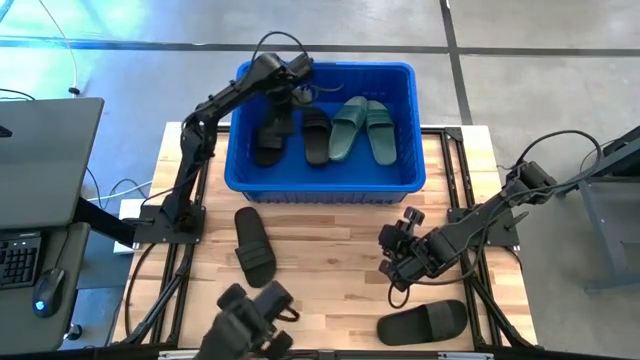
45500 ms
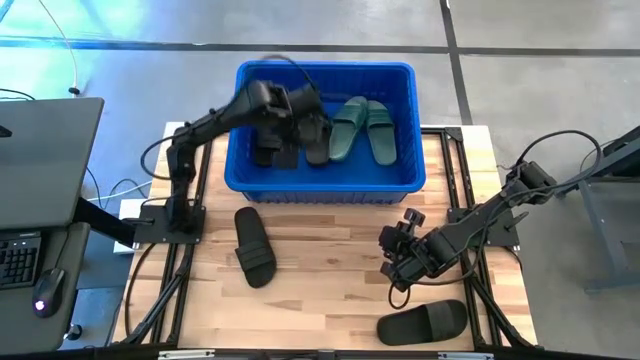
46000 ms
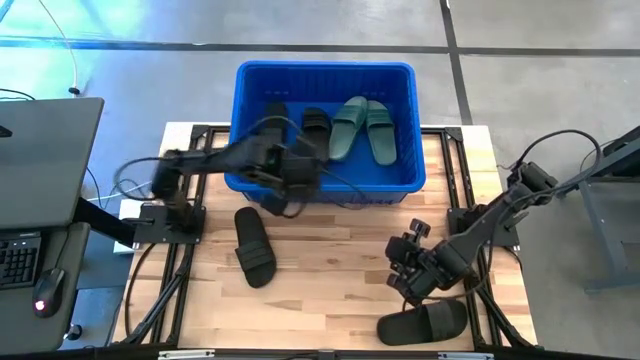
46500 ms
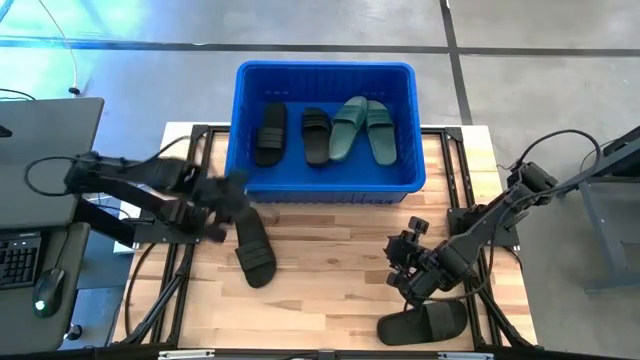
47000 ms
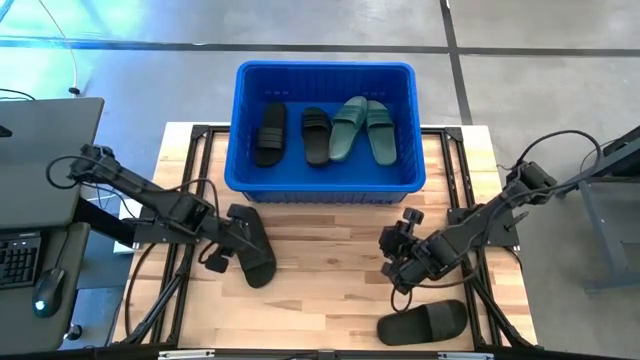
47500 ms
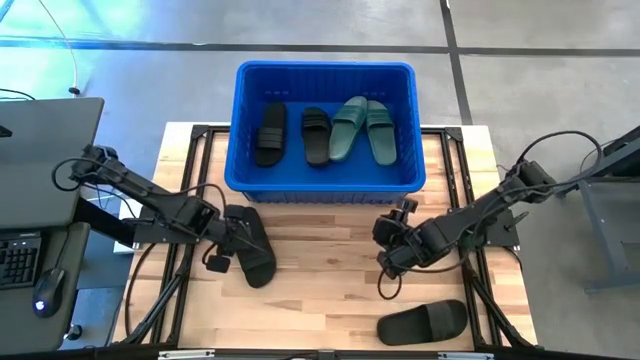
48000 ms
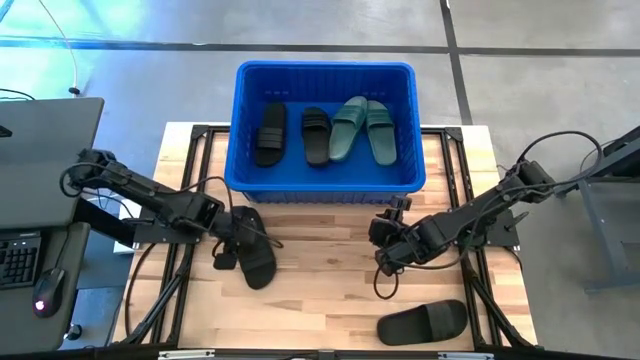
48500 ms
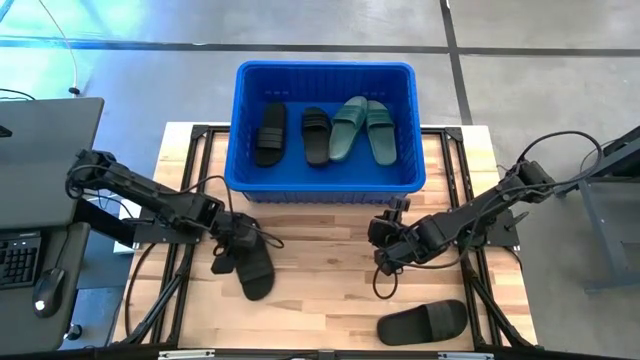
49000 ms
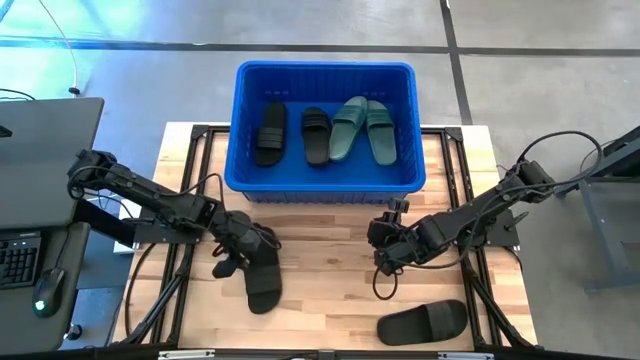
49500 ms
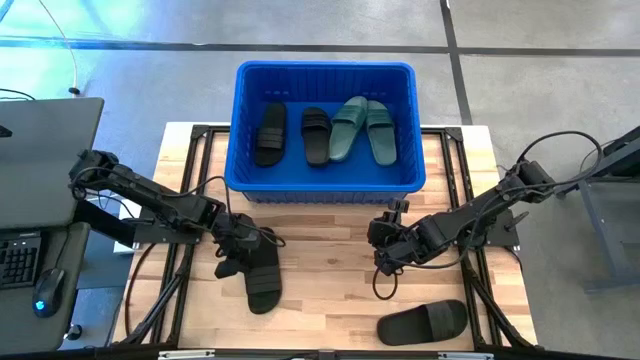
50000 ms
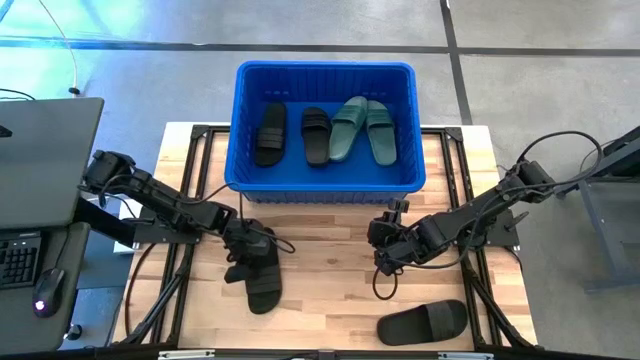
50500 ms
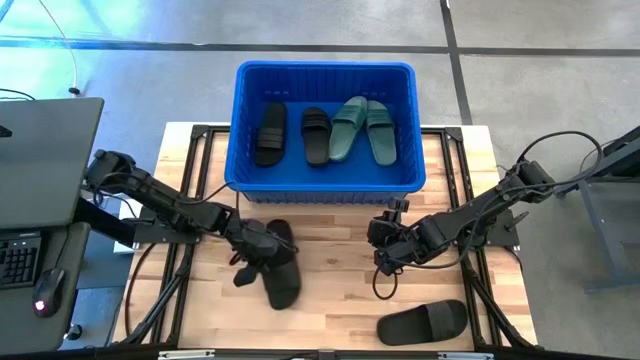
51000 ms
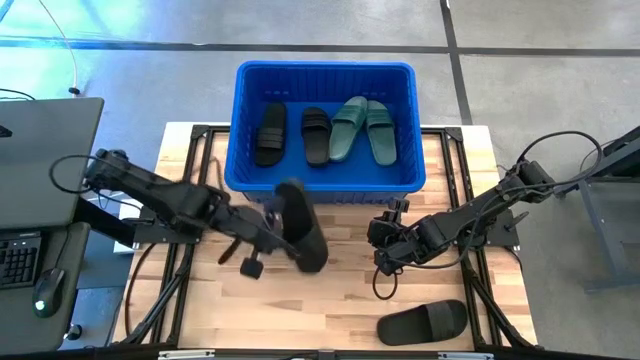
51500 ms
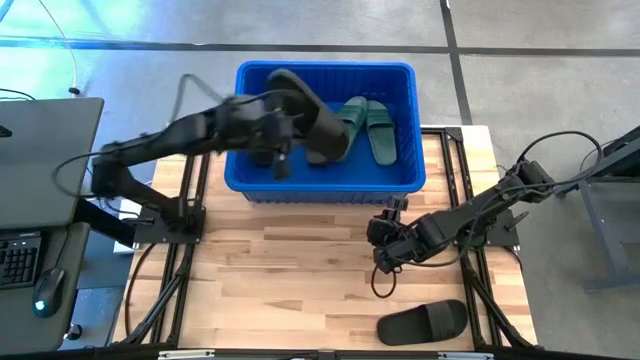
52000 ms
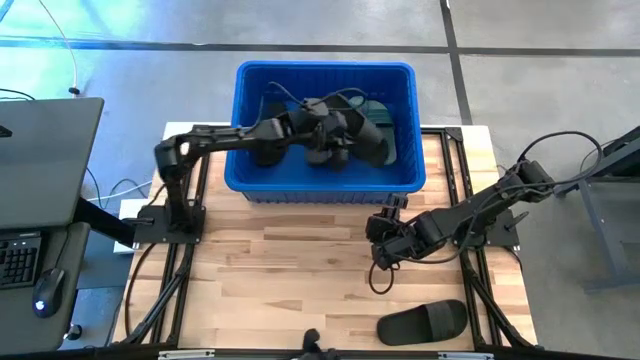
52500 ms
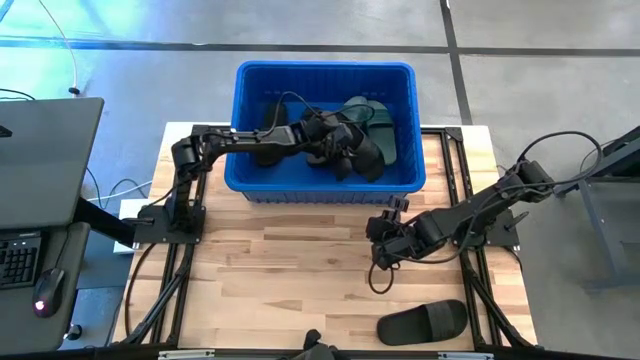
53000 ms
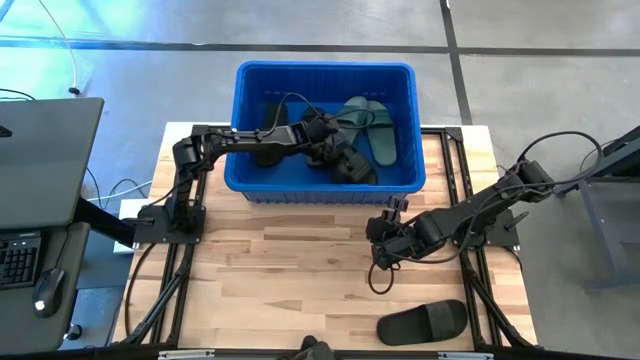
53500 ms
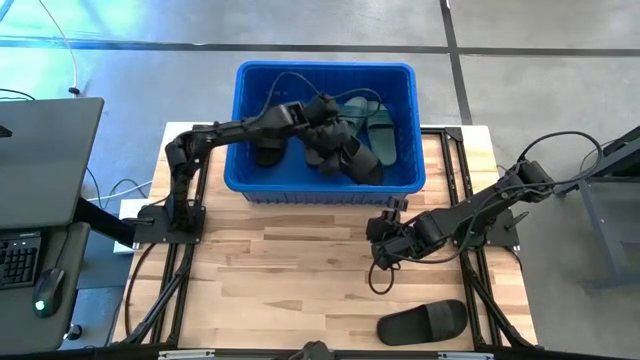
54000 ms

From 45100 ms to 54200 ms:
Task: Pick and place slides into bin
Put the top black slide into the blue container

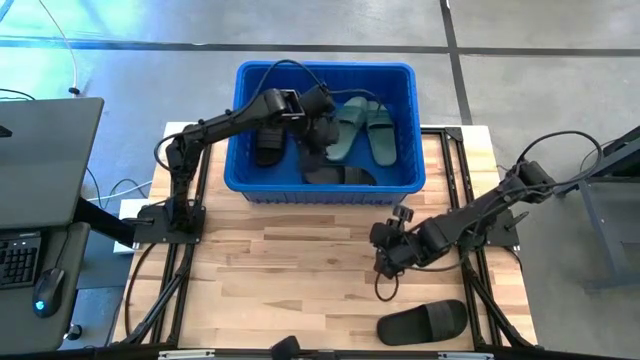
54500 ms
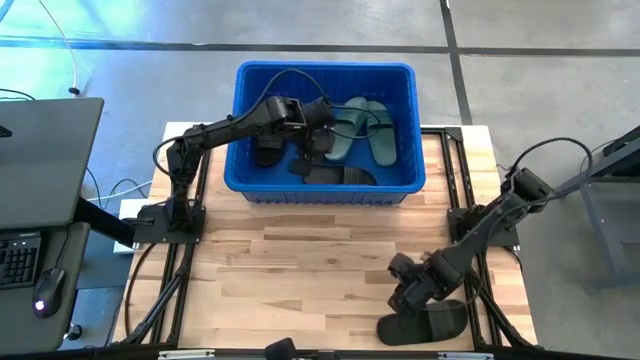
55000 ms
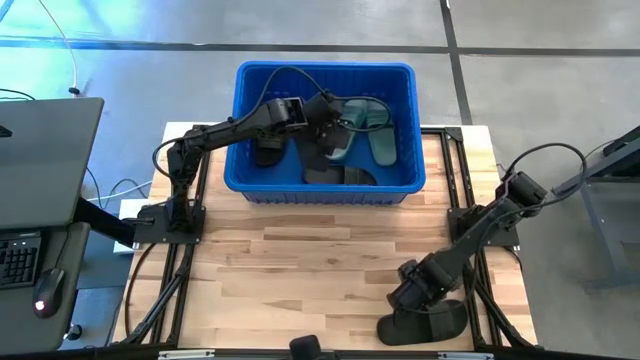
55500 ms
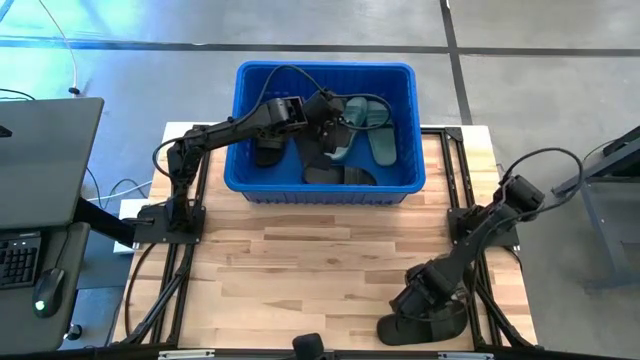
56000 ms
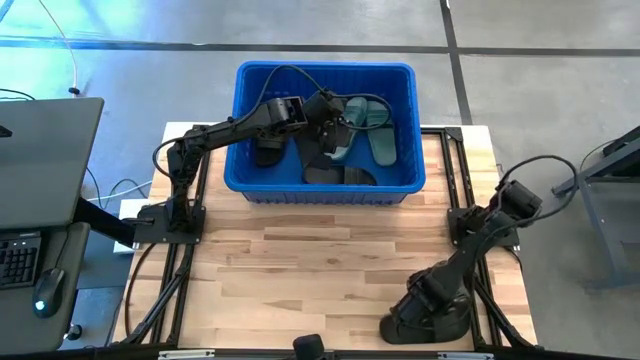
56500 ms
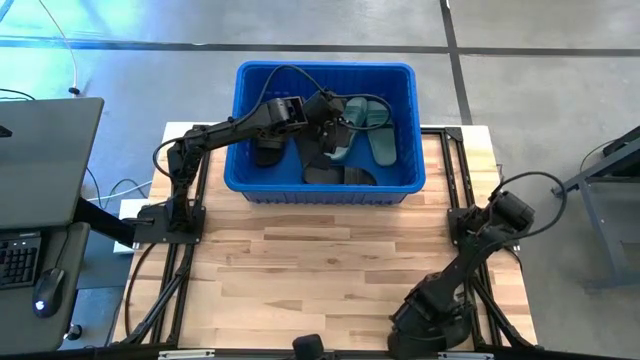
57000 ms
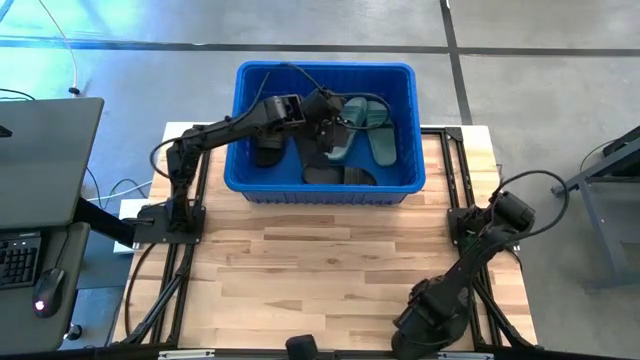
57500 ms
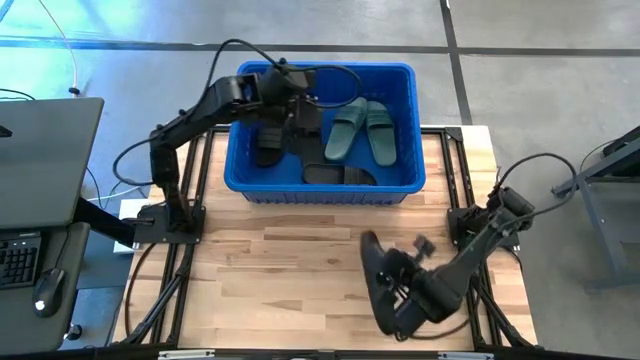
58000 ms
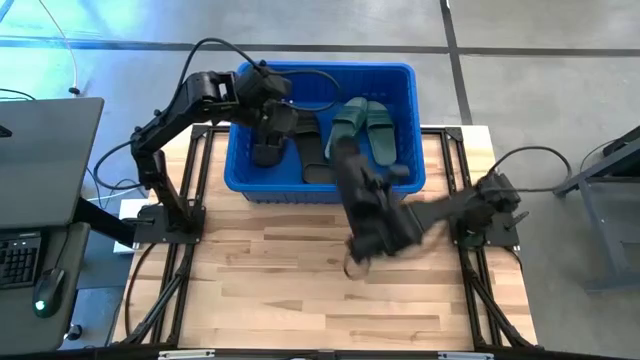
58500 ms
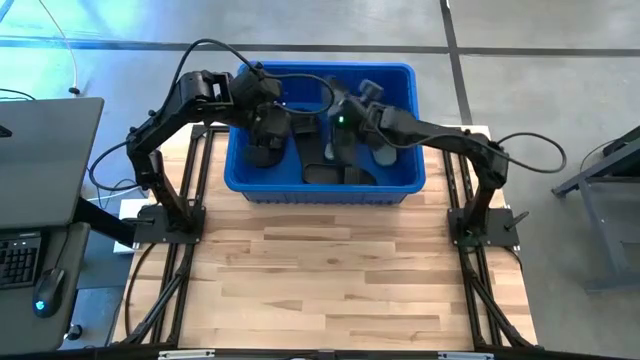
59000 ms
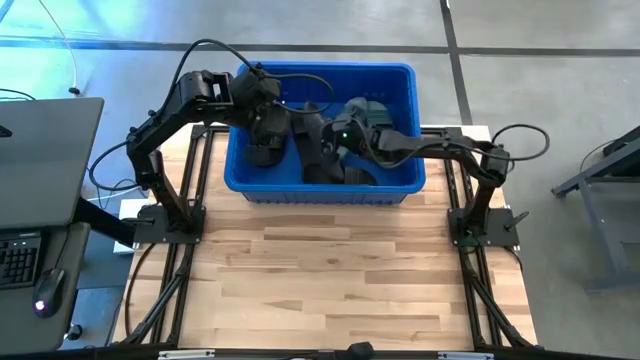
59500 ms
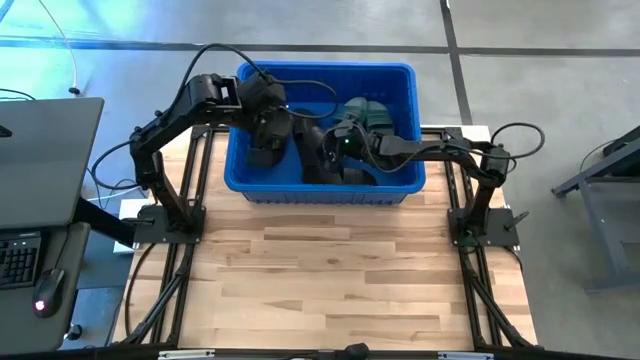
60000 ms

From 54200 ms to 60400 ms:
Put the black slide into the blue container

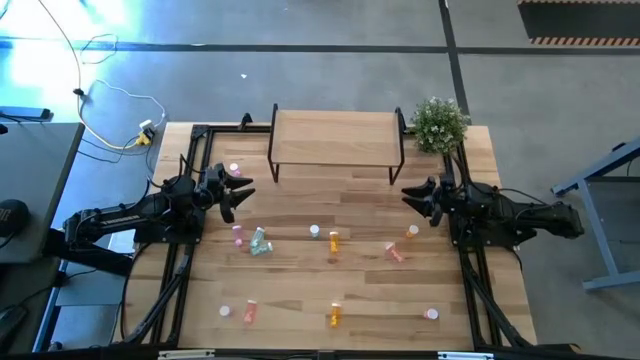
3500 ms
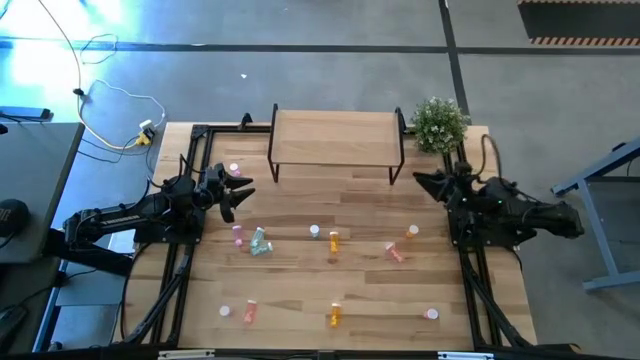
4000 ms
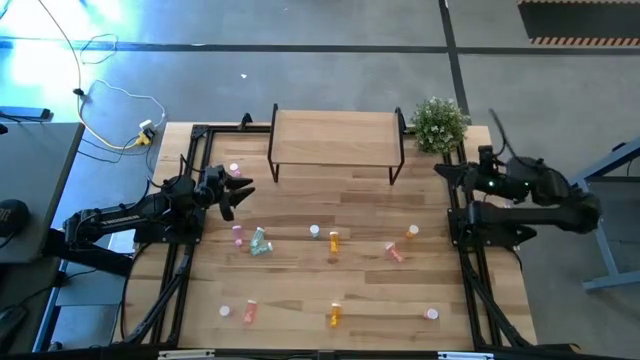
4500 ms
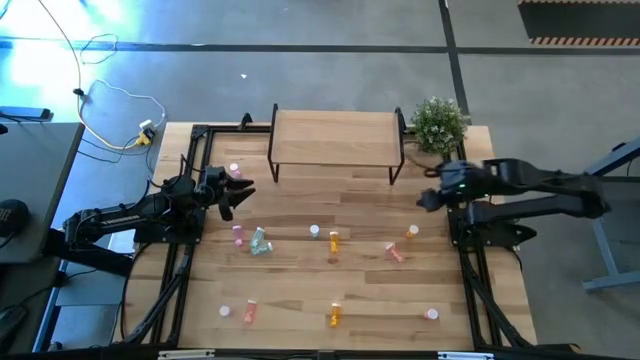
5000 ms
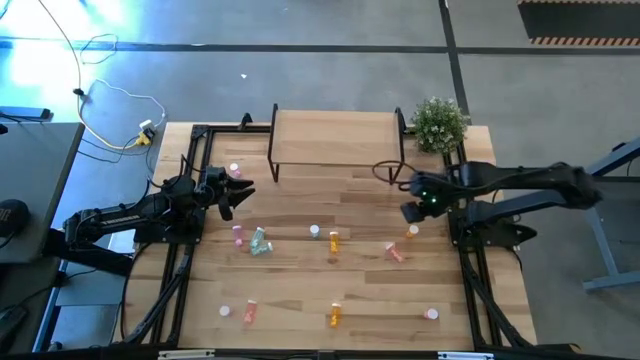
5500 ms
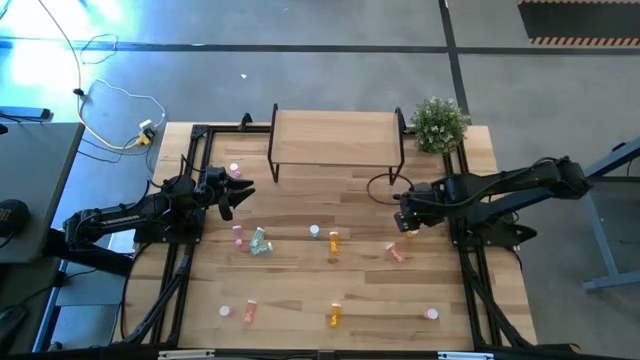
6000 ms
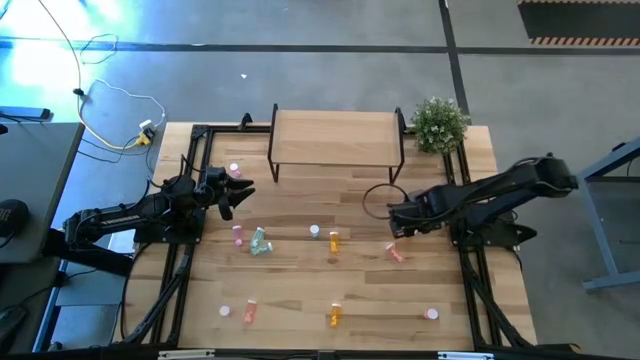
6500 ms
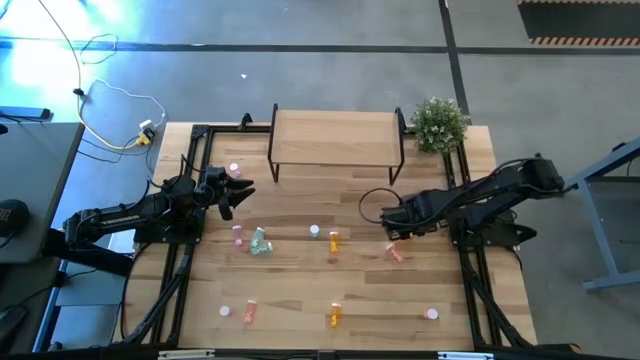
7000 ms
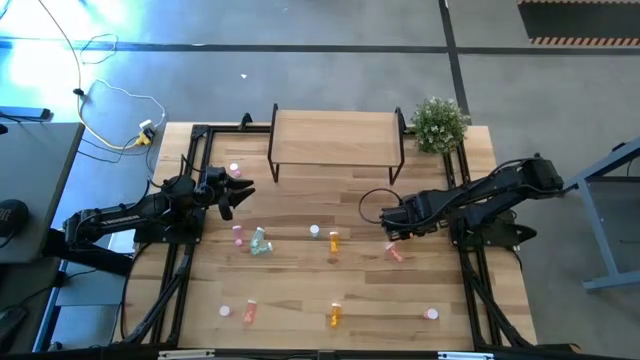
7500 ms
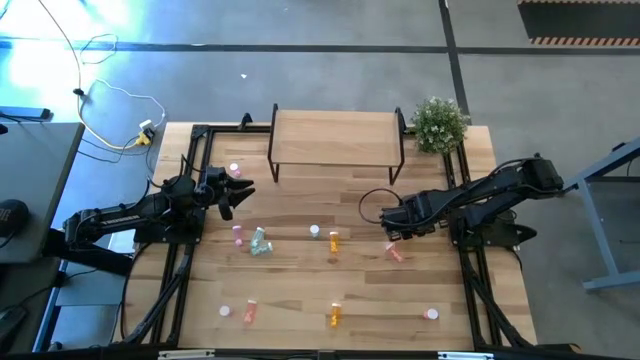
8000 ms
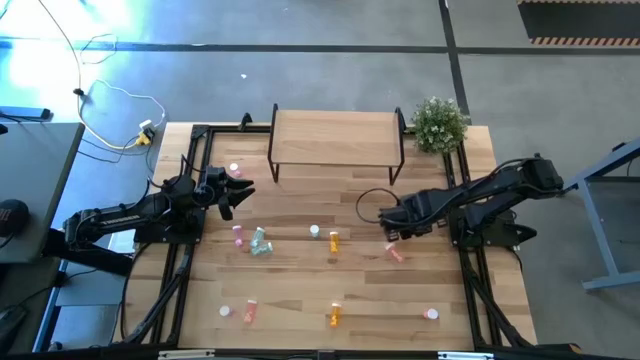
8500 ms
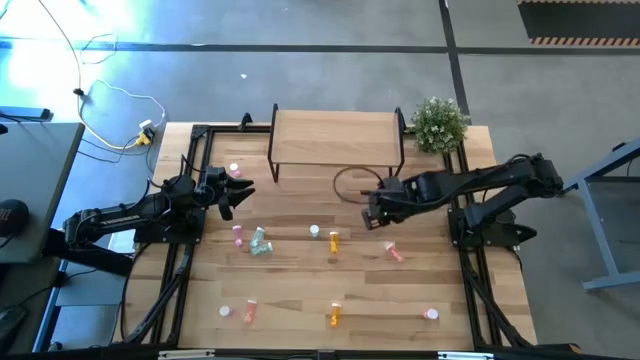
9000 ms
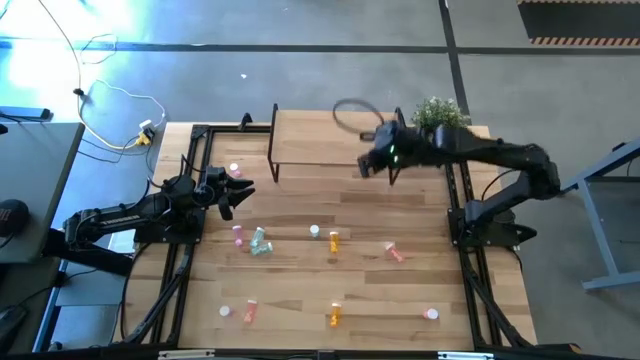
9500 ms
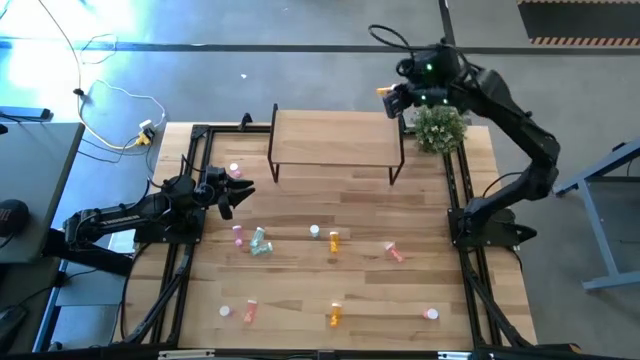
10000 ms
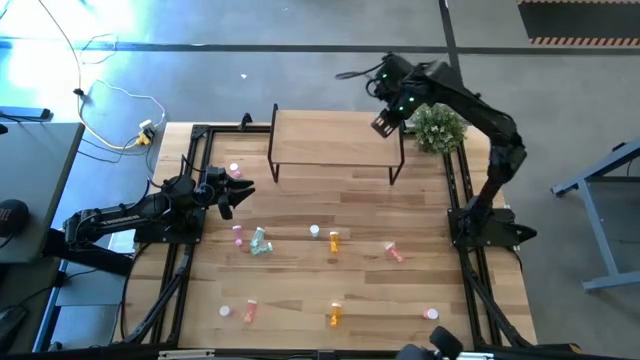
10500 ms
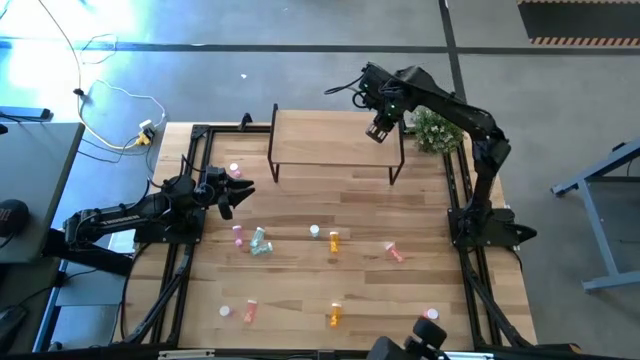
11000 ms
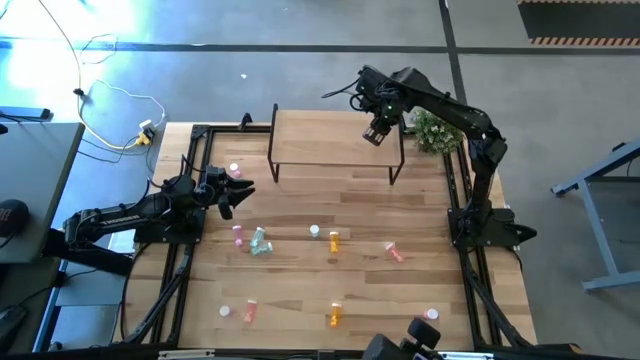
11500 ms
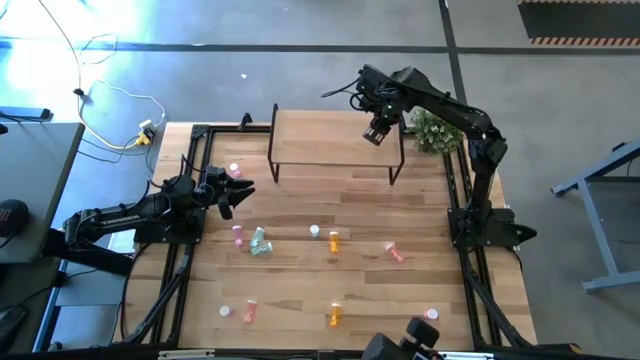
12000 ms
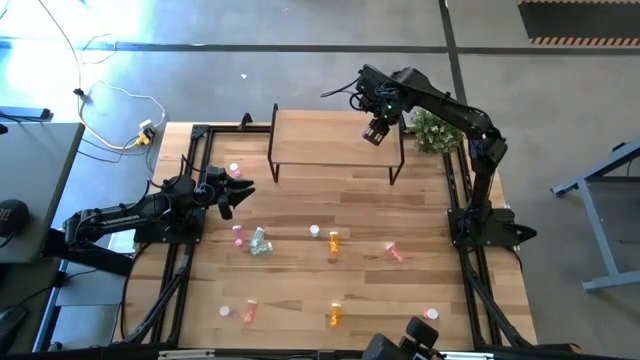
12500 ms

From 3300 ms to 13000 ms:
Task: Pick and place medicine bottles onto shelf by color
Put the top right orange pill bottle on the shelf
